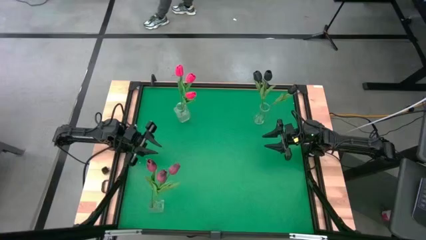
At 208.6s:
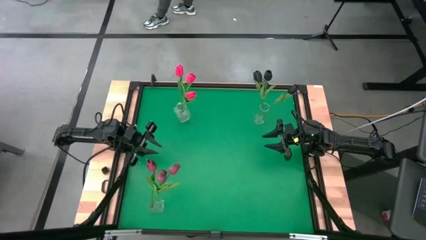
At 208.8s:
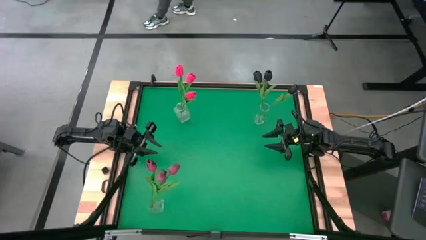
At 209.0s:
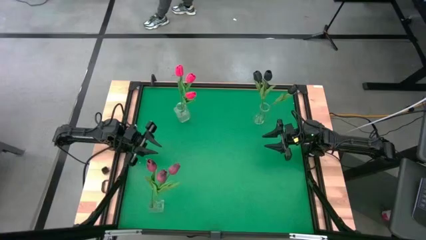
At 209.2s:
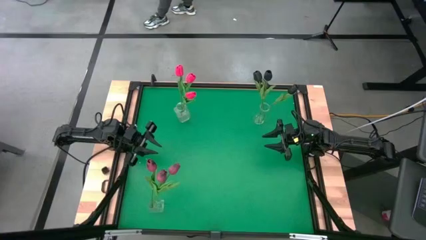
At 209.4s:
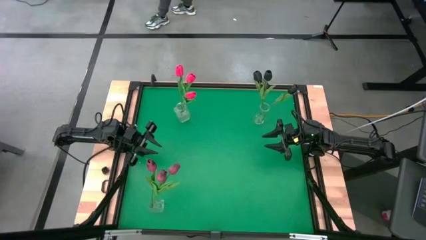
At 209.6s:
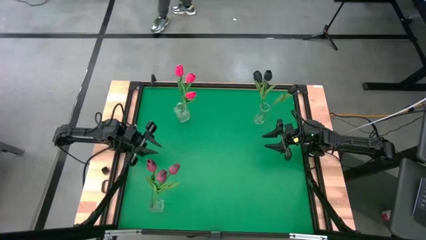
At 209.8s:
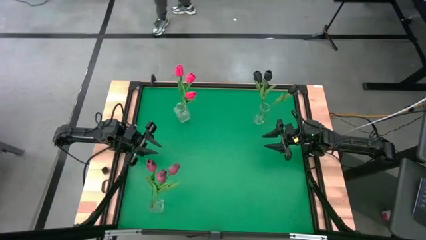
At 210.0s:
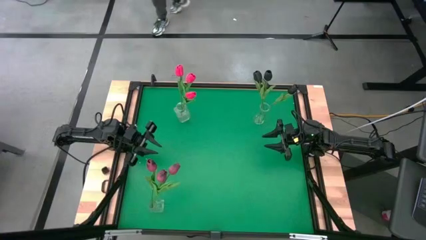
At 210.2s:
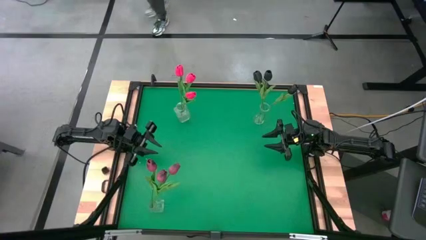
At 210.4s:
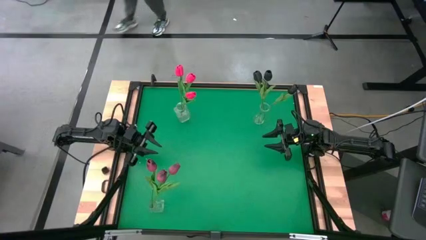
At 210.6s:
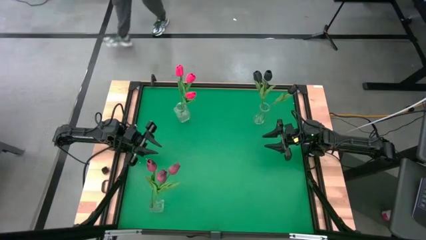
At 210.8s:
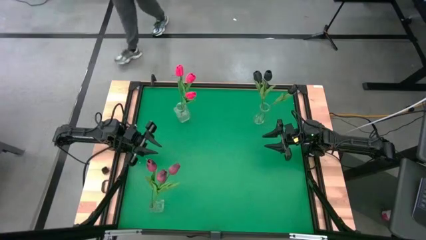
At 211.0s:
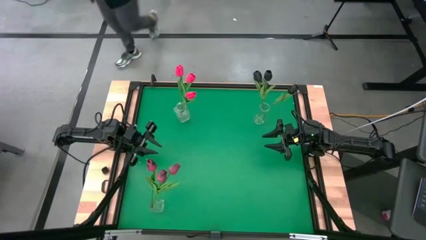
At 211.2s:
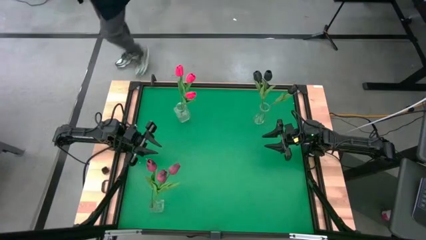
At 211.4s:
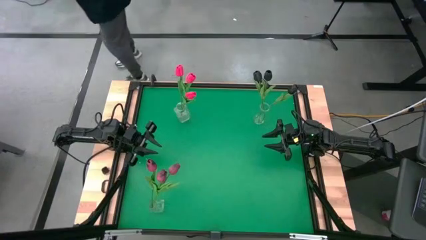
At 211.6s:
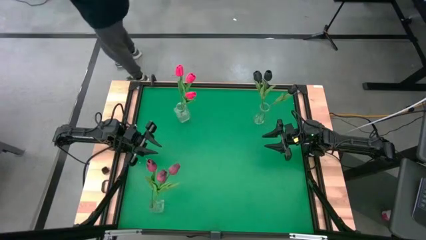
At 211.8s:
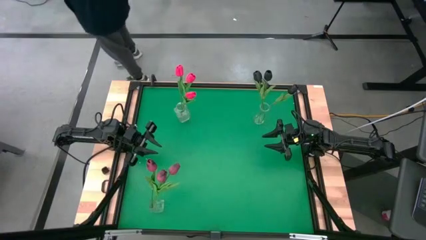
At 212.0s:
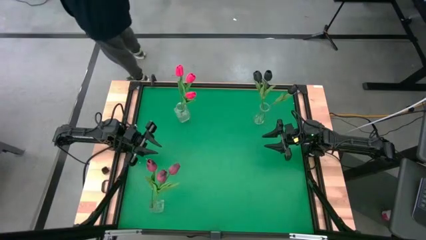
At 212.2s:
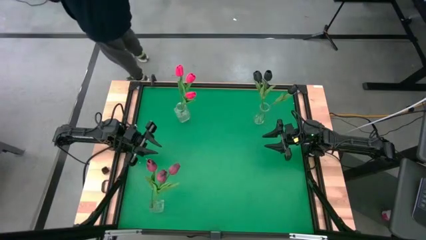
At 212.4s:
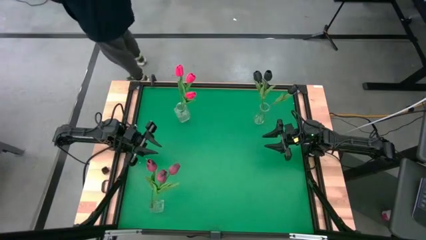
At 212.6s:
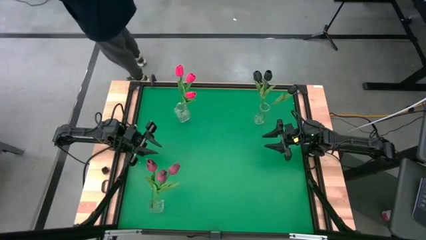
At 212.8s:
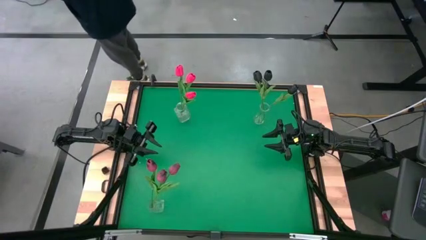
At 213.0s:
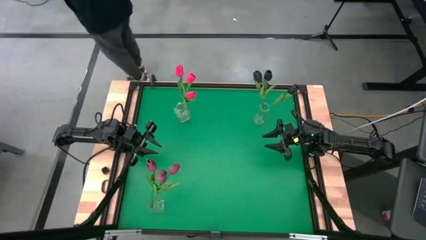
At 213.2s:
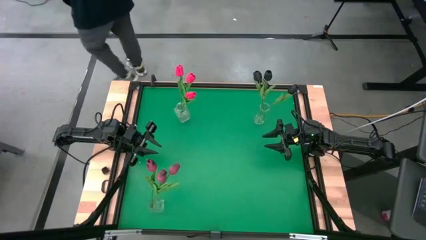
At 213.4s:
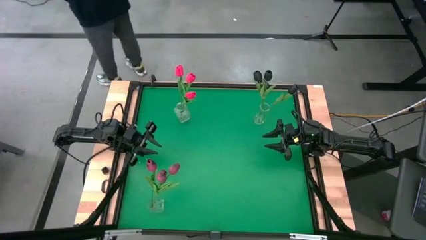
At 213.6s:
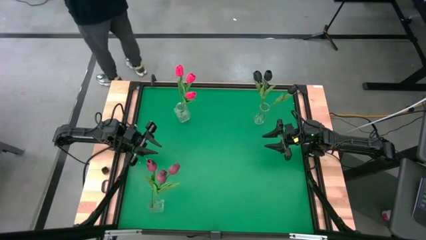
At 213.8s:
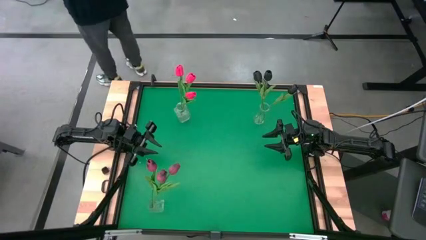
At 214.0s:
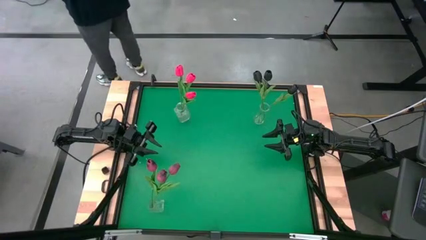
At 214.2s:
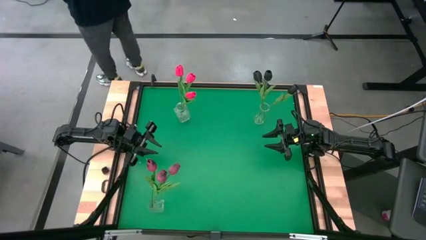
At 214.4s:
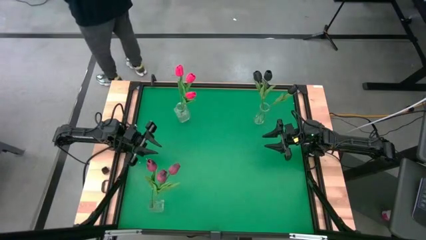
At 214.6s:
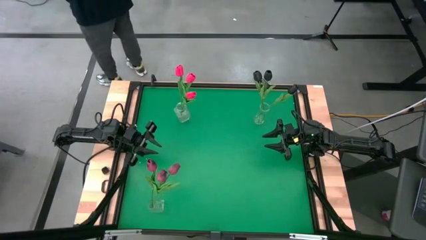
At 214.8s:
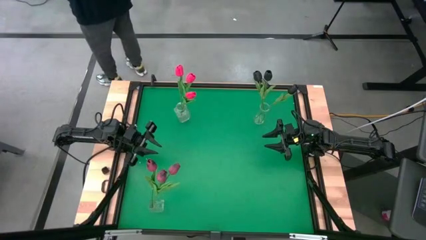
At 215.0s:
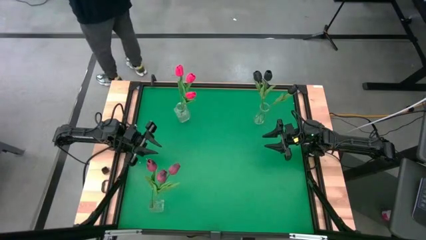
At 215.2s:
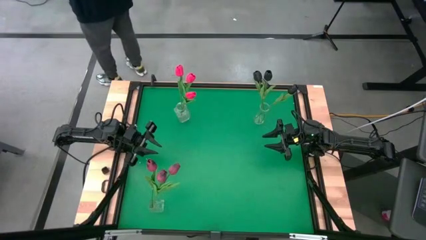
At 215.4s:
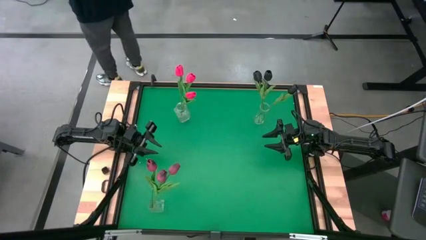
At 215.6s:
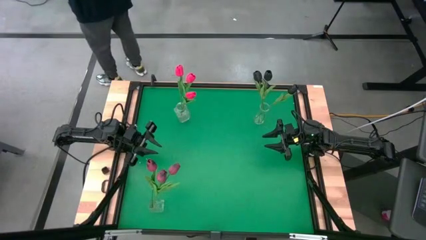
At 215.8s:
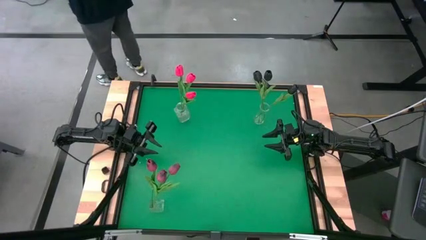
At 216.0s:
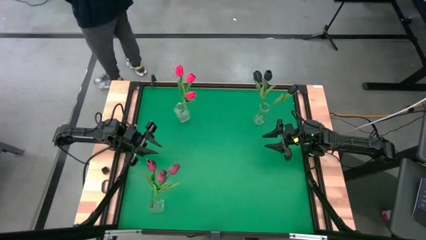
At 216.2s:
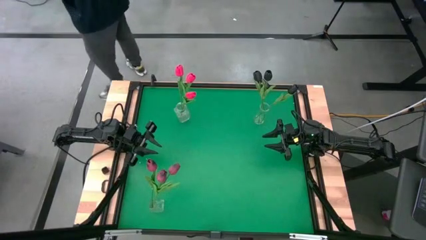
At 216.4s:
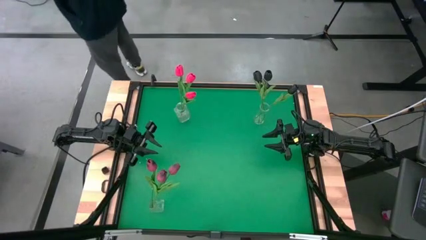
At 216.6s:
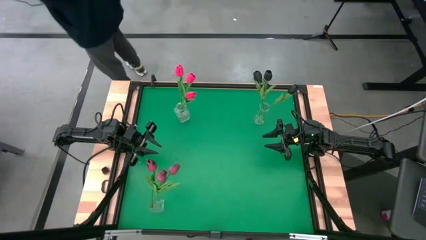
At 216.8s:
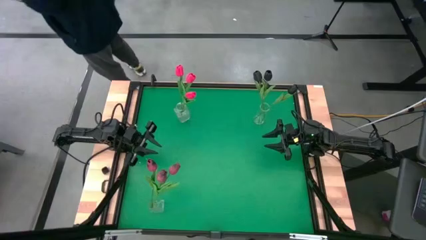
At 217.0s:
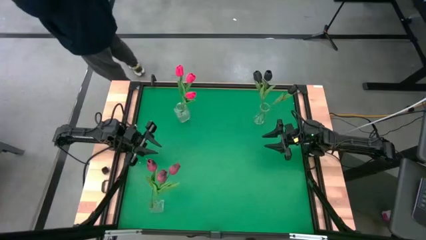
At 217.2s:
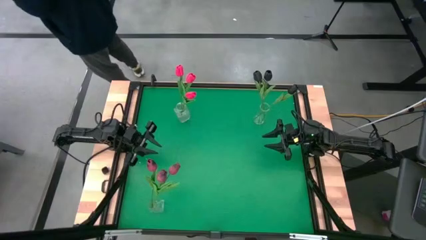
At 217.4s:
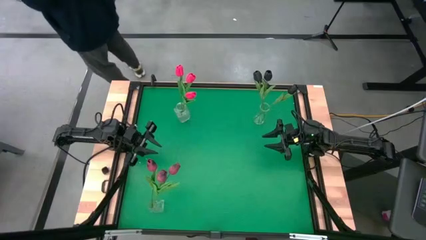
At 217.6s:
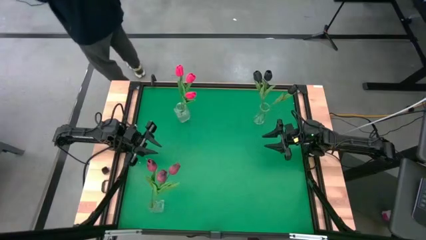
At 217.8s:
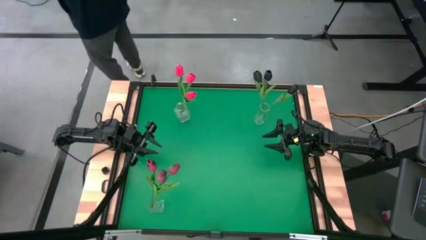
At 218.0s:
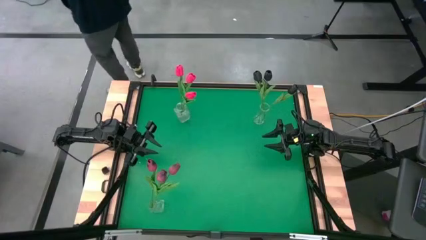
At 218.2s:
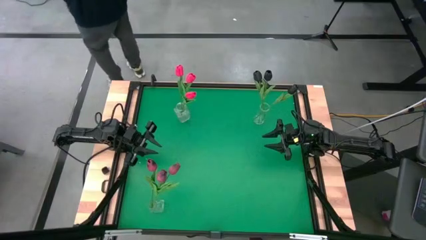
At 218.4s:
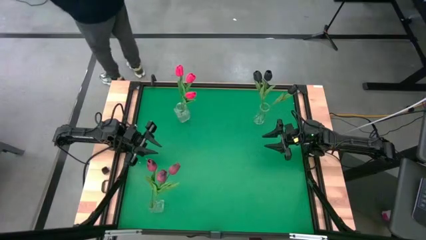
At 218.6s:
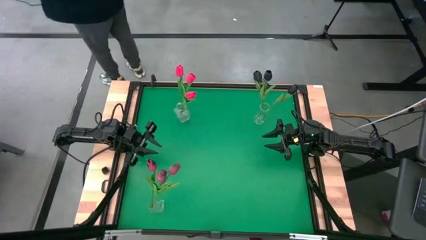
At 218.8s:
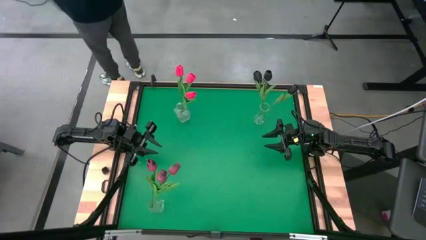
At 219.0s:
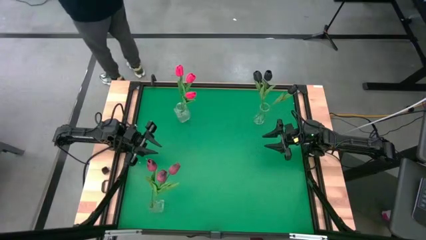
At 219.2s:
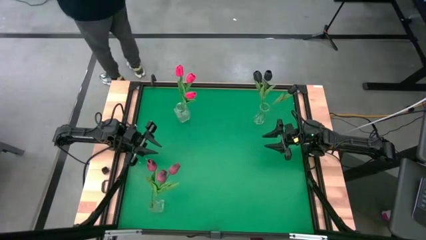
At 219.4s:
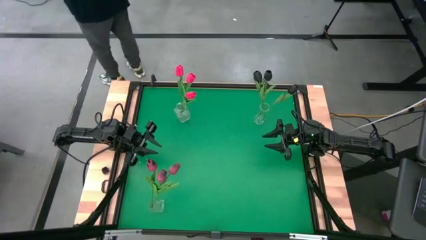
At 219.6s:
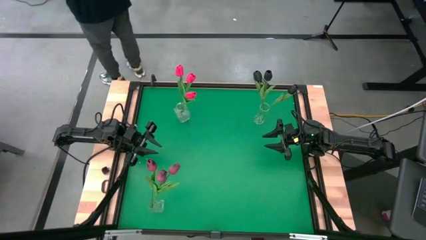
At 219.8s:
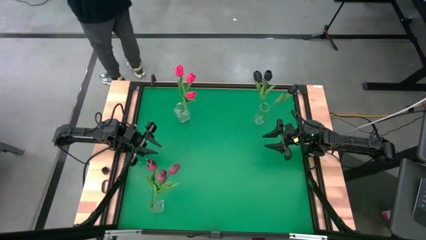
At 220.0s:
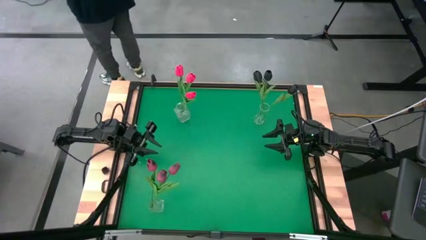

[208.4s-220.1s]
Task: Sort flowers into vase by color
Return to Home Position
